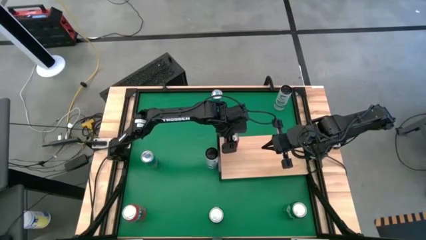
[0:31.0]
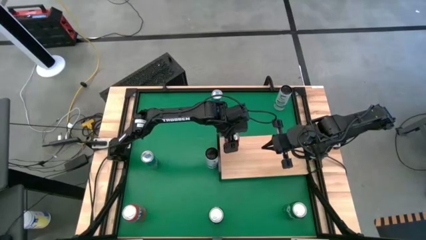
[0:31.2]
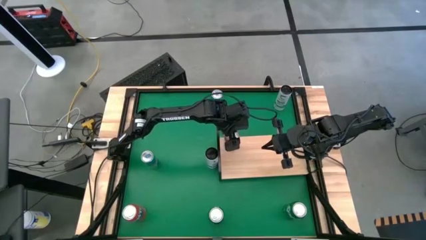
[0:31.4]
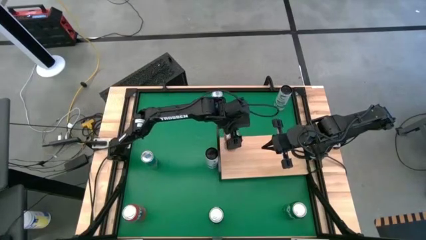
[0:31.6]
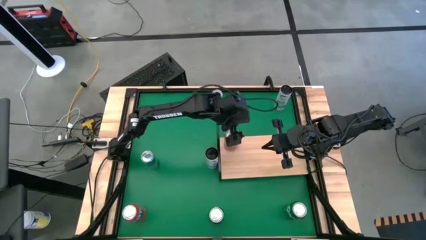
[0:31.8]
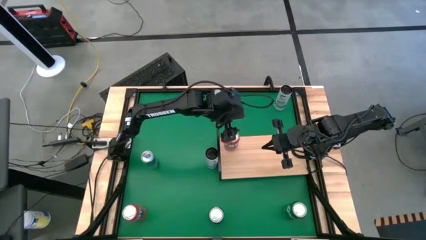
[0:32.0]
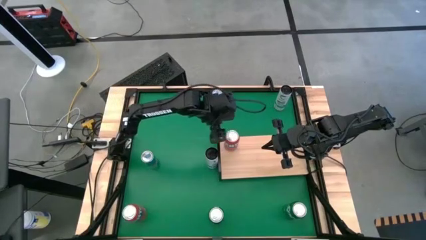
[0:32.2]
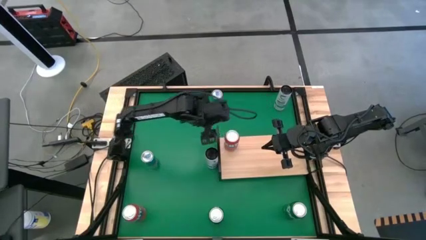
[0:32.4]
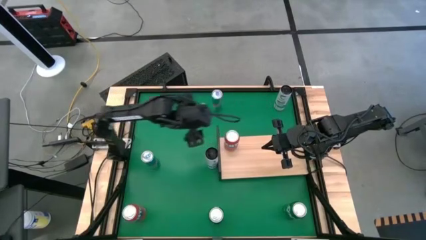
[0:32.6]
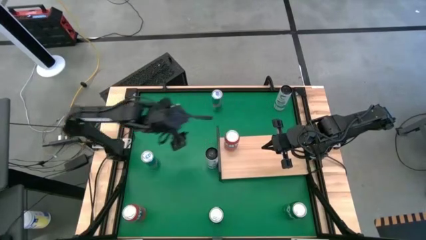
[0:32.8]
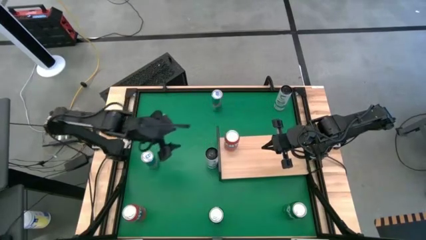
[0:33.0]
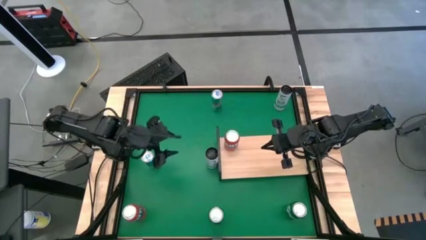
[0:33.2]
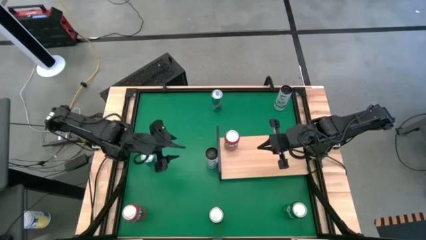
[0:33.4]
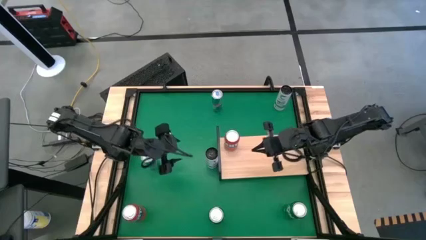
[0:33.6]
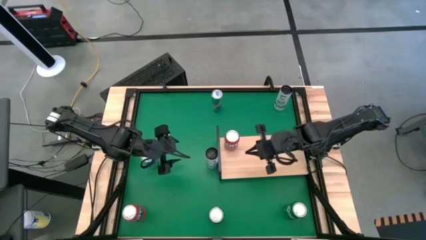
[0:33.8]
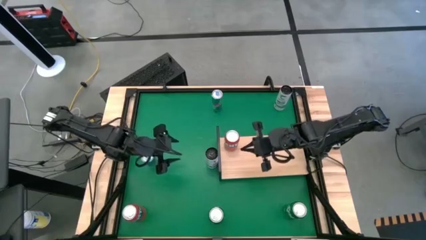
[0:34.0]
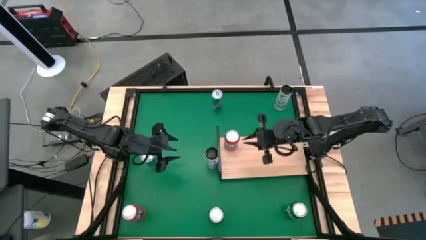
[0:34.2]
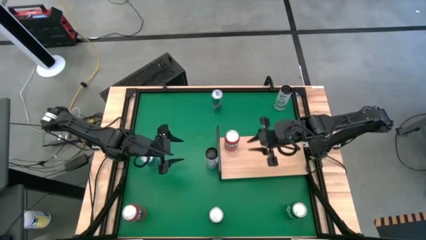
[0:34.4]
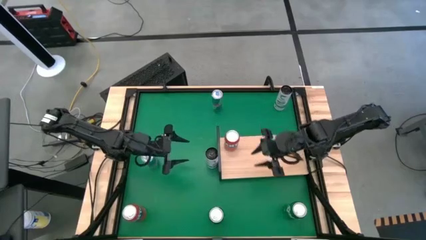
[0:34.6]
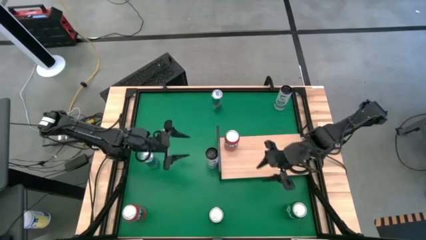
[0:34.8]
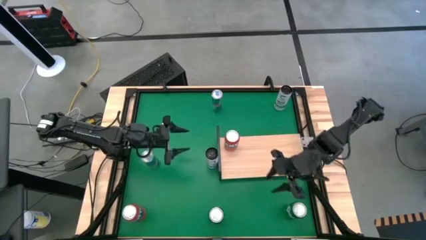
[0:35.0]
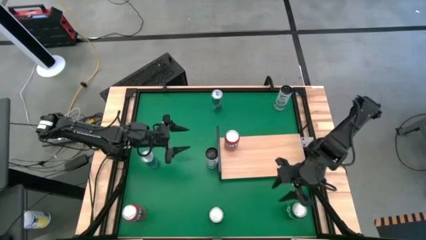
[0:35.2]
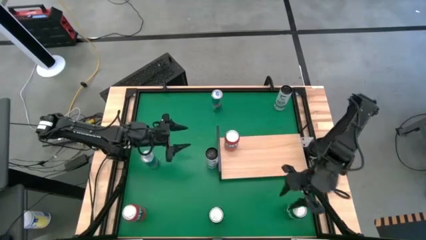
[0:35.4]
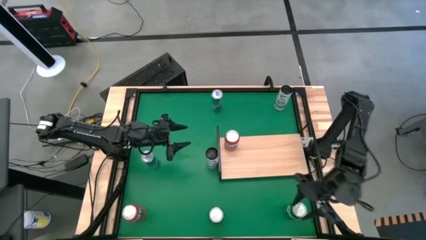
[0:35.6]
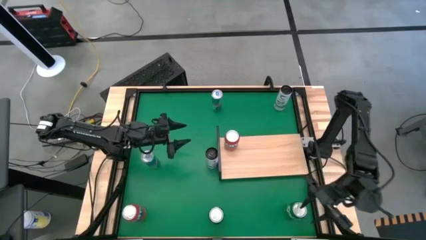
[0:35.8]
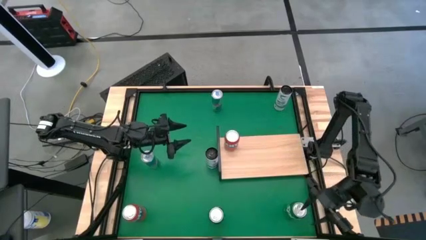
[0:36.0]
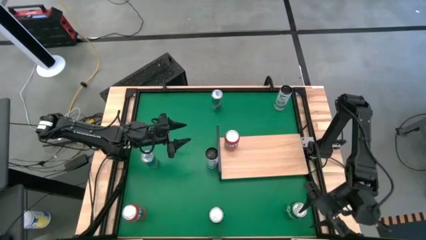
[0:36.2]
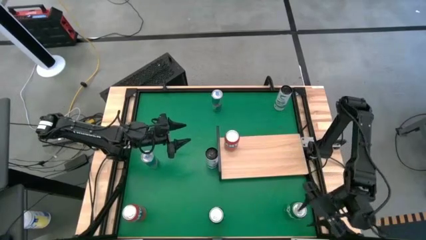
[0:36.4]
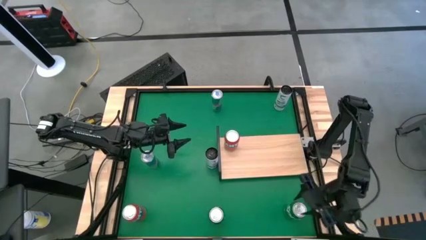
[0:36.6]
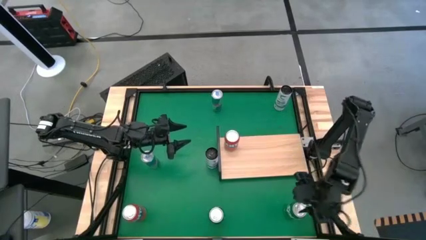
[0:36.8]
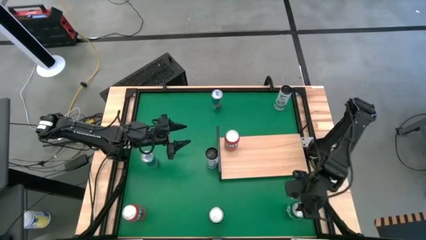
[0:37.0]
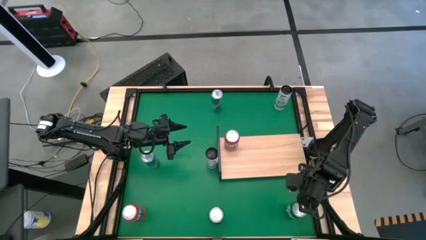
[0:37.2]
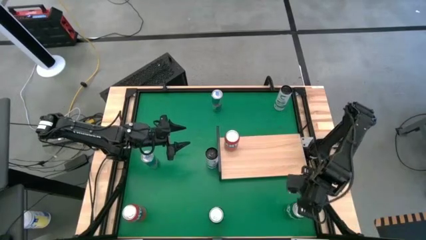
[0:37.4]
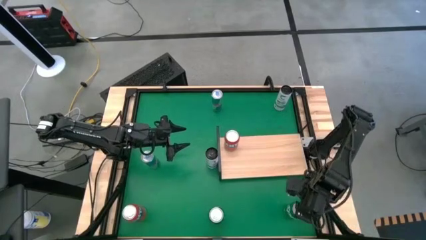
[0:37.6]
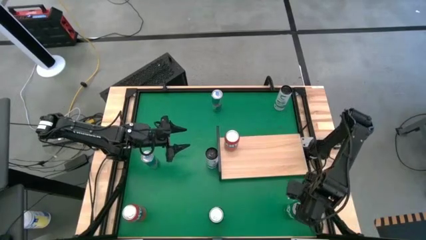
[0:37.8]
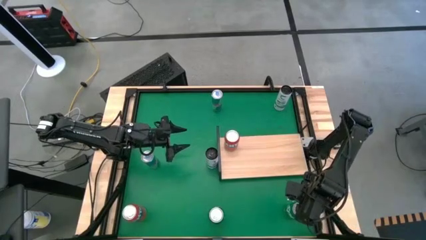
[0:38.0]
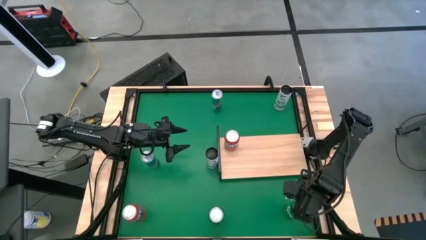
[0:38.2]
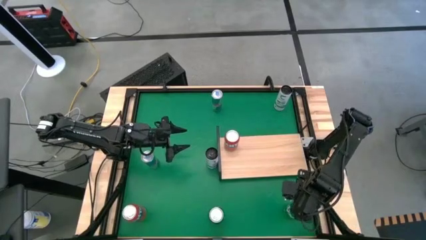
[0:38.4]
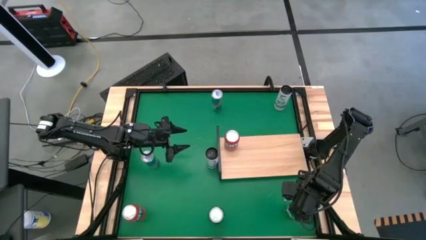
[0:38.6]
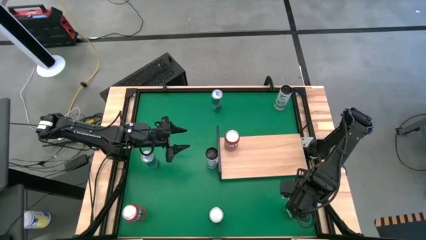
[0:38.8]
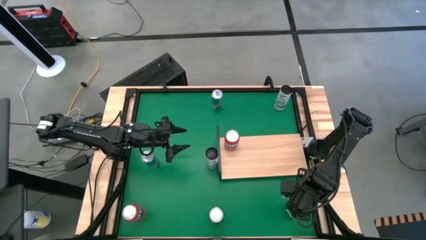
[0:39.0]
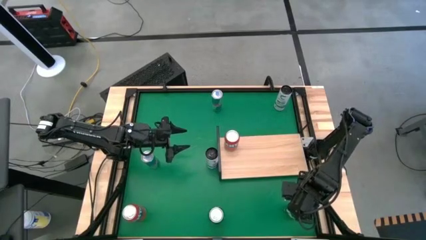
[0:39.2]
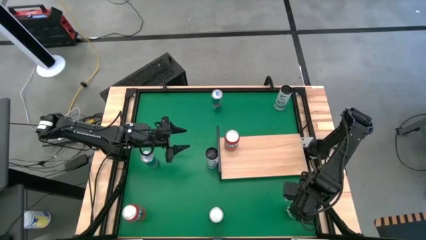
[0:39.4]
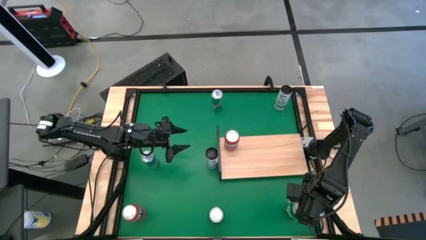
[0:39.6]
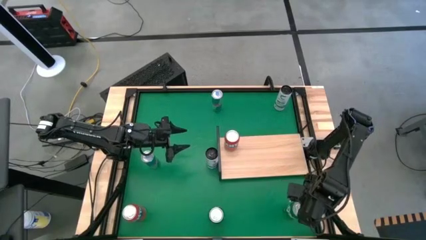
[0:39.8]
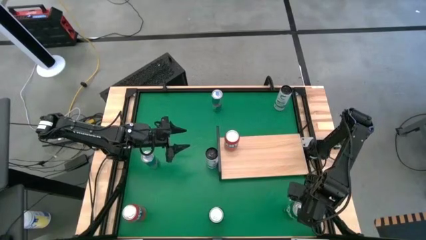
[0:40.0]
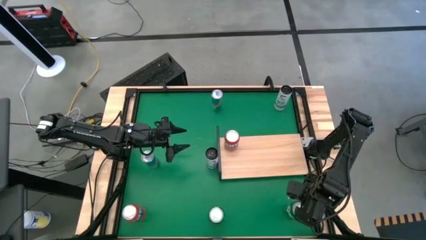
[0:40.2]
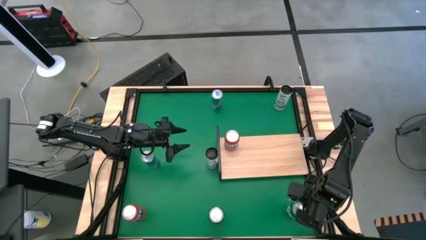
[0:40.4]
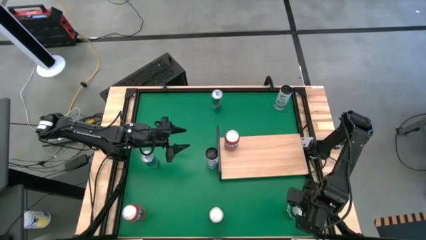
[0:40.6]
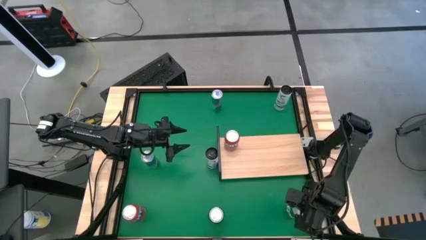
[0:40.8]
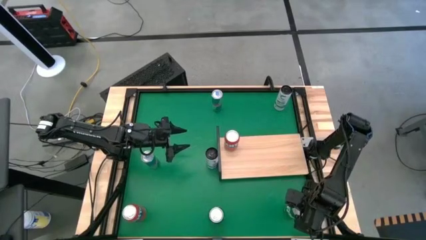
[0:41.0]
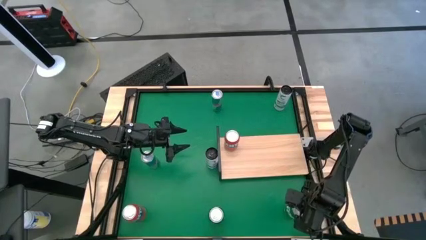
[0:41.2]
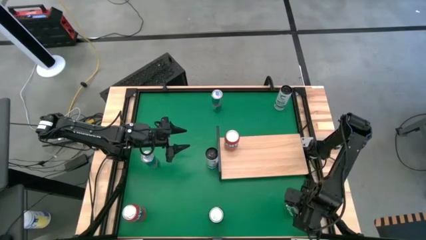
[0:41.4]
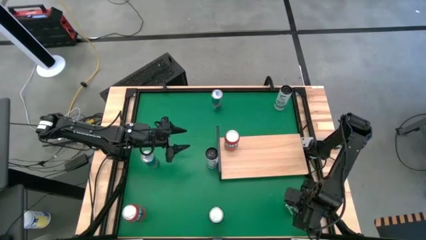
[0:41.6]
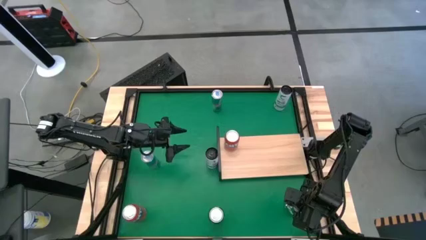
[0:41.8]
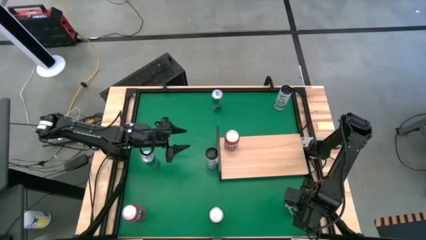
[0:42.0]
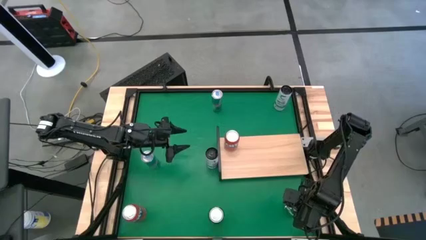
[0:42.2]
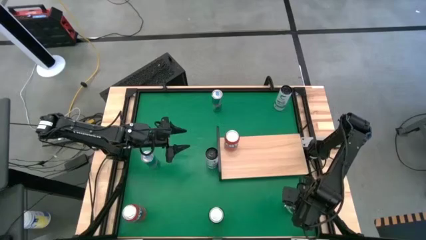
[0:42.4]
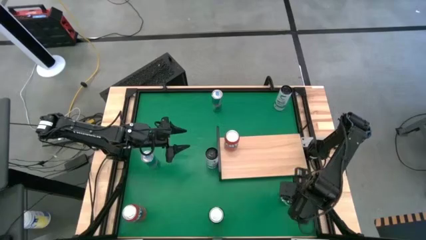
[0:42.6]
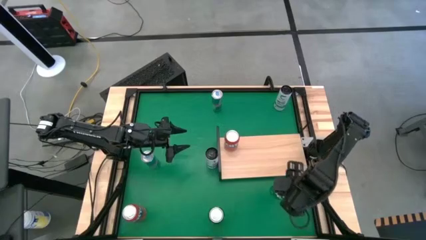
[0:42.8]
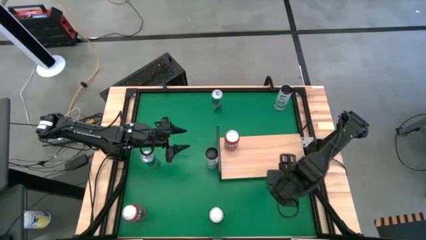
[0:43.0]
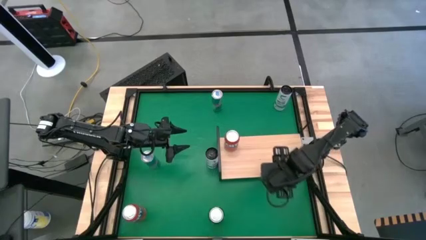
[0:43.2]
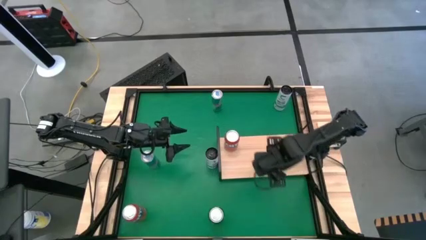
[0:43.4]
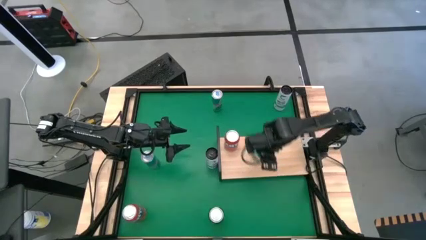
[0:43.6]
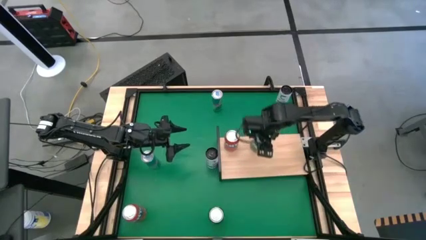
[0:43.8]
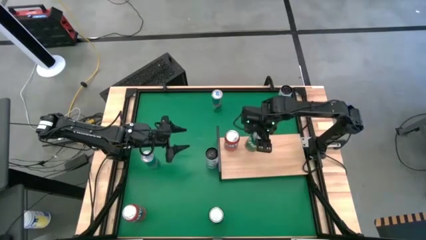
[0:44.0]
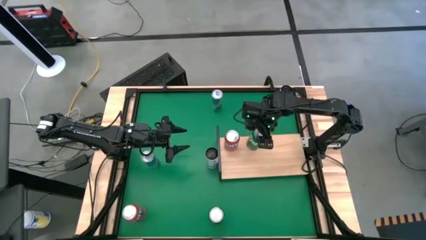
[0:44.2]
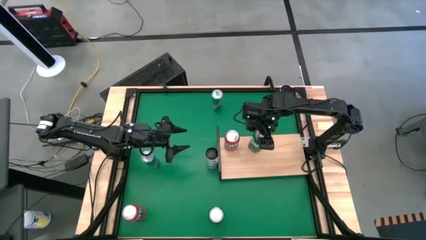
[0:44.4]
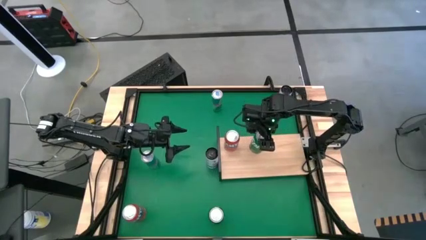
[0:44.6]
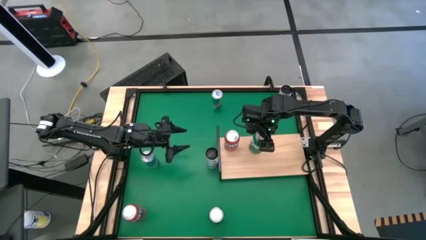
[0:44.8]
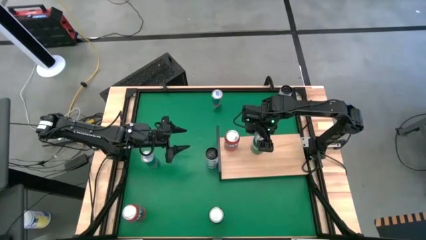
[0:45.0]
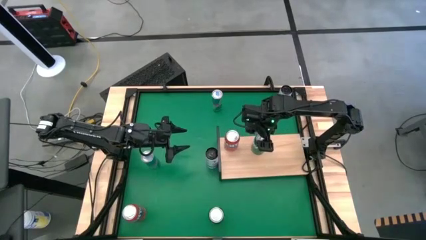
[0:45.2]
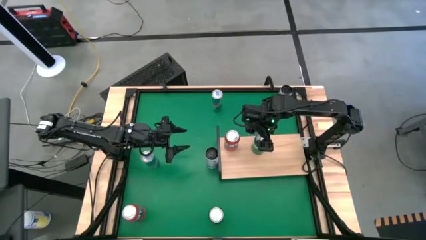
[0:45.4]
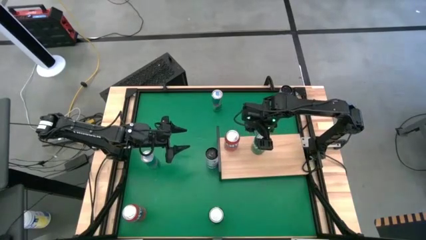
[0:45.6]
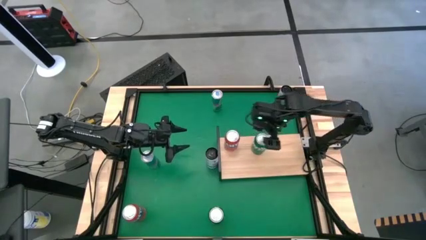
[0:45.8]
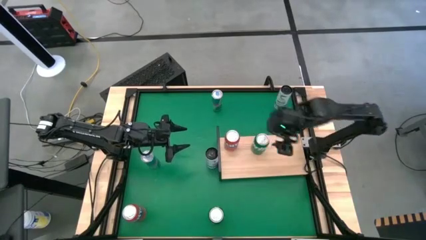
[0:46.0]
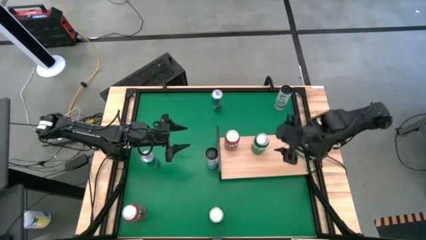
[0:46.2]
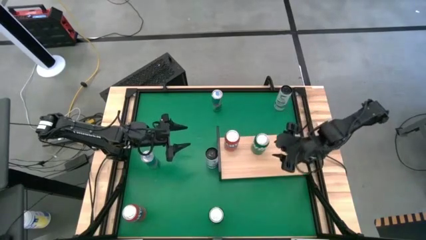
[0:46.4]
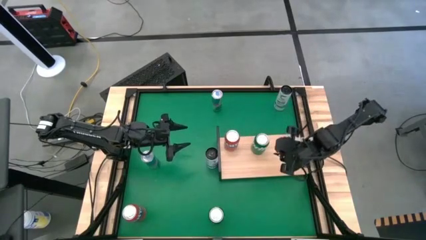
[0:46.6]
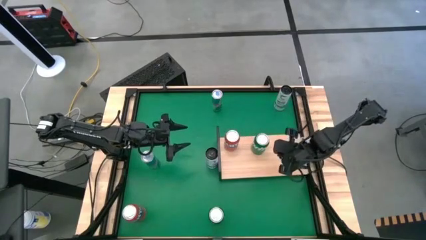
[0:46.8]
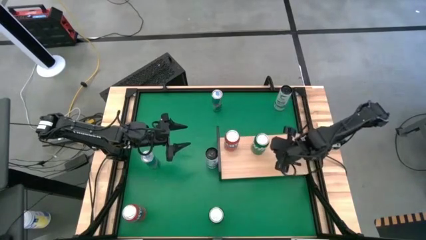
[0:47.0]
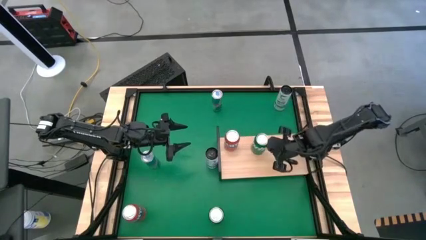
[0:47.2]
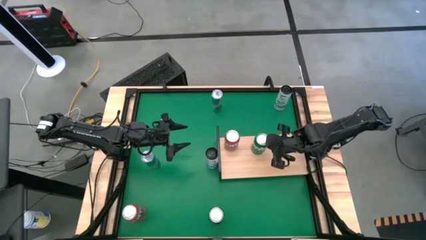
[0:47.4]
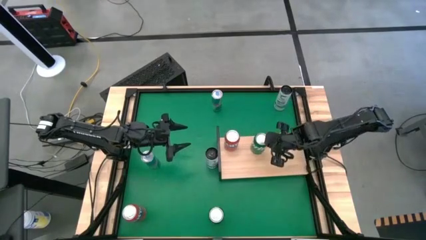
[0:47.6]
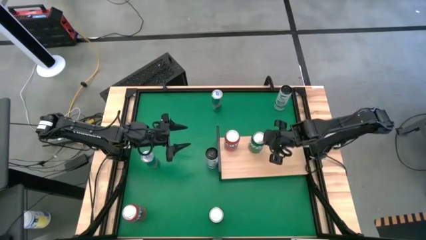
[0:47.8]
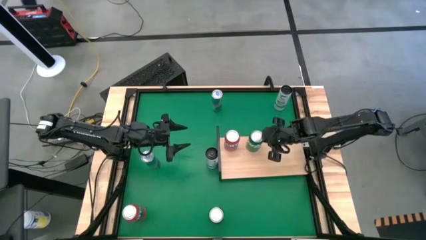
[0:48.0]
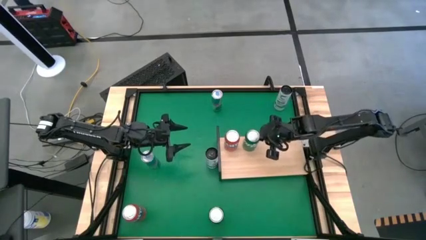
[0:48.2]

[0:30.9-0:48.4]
Task: Place canned beverage on shelf
Put the right green soda can on the shelf
